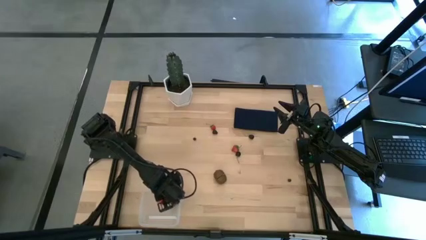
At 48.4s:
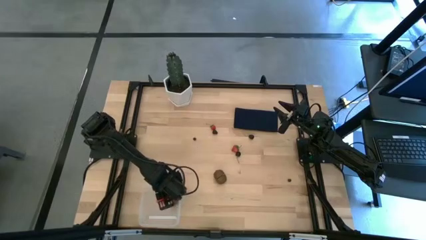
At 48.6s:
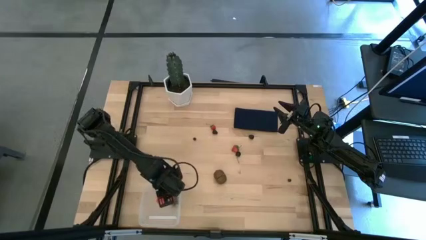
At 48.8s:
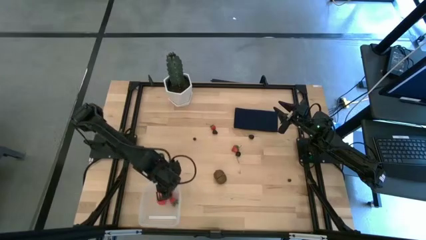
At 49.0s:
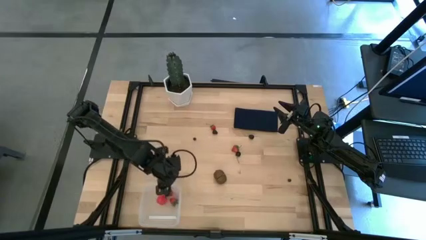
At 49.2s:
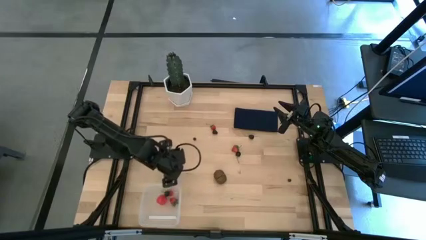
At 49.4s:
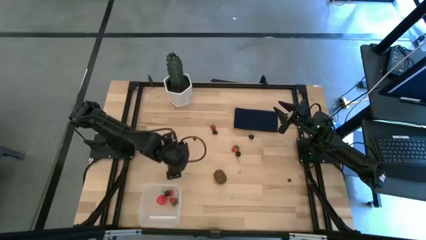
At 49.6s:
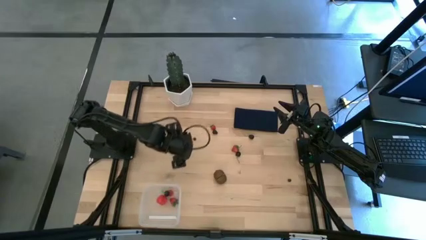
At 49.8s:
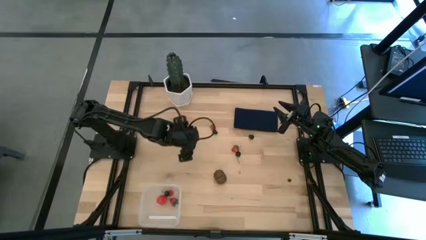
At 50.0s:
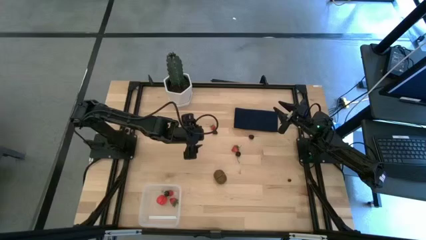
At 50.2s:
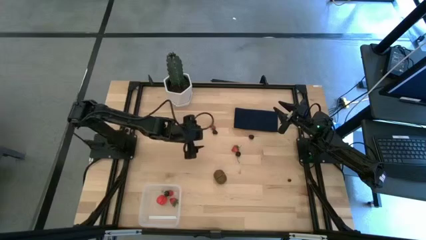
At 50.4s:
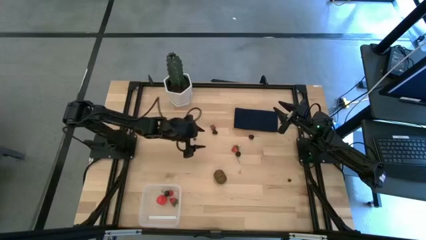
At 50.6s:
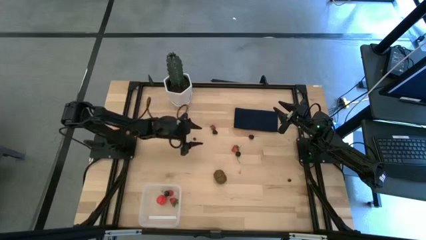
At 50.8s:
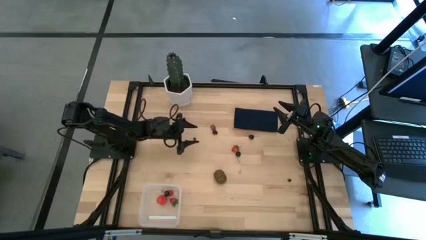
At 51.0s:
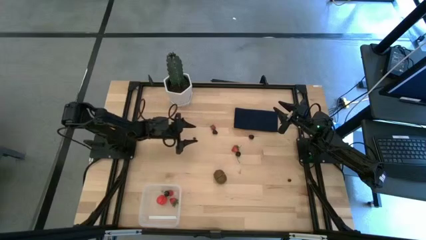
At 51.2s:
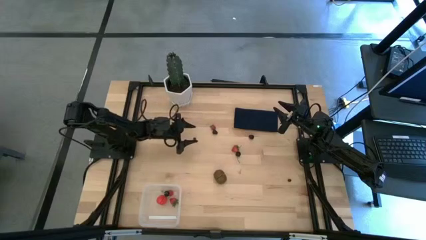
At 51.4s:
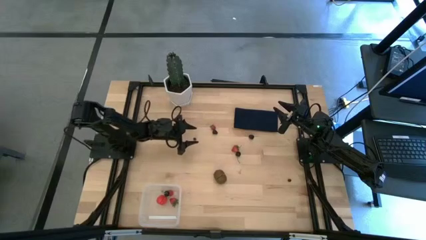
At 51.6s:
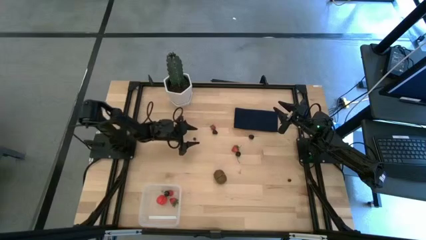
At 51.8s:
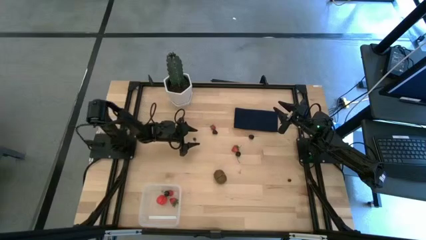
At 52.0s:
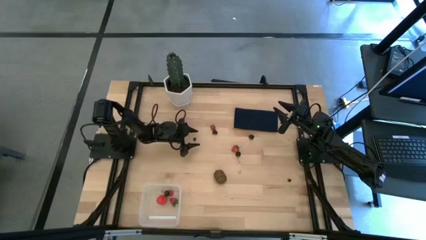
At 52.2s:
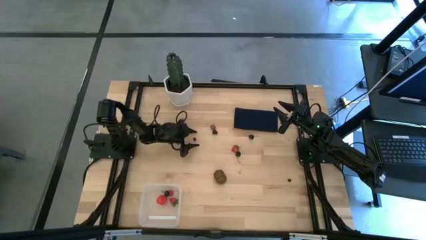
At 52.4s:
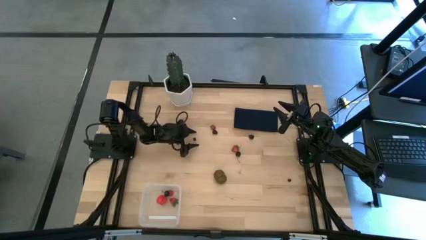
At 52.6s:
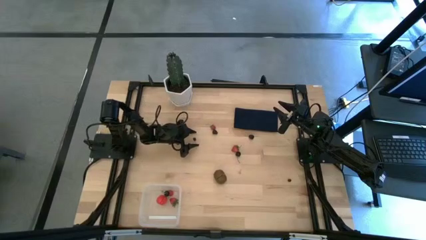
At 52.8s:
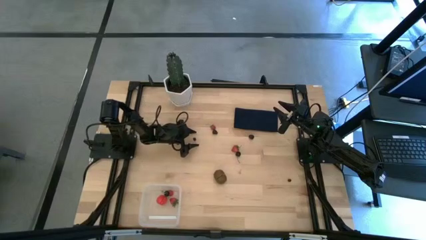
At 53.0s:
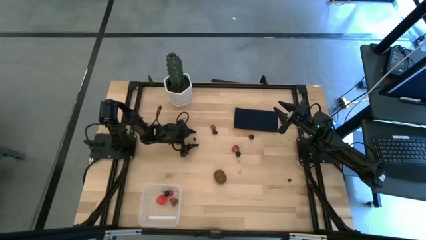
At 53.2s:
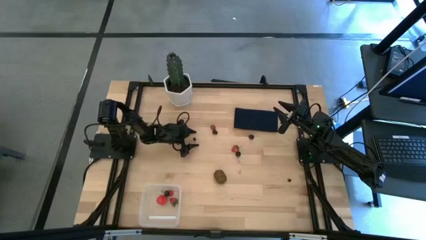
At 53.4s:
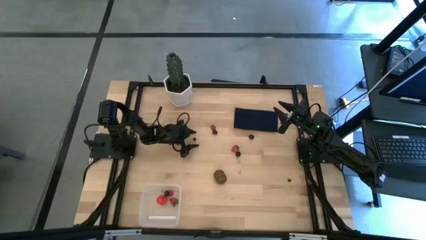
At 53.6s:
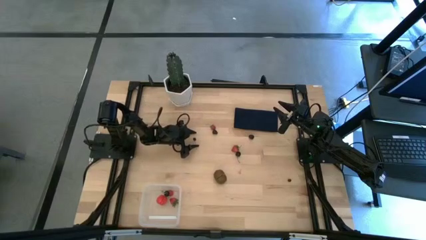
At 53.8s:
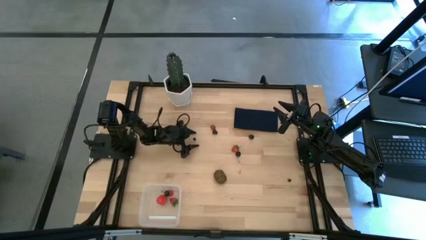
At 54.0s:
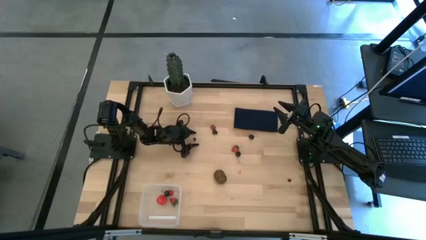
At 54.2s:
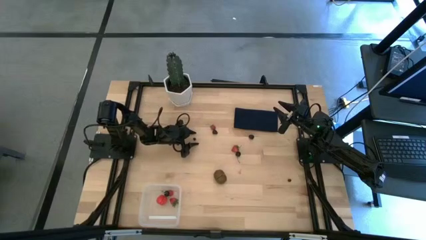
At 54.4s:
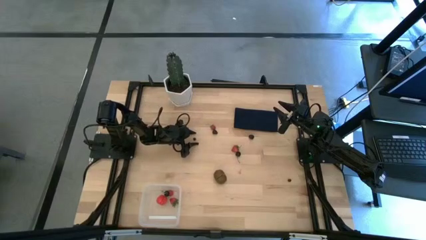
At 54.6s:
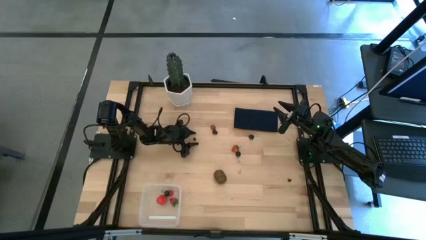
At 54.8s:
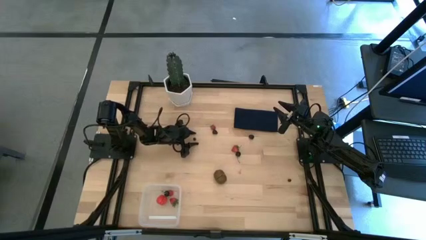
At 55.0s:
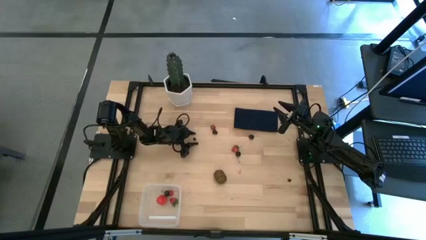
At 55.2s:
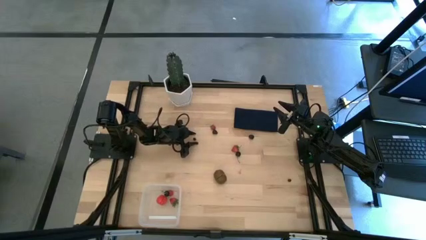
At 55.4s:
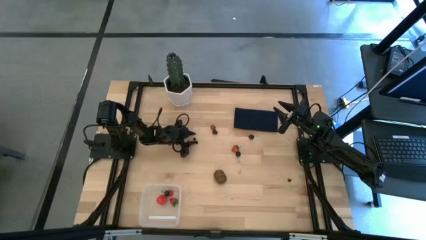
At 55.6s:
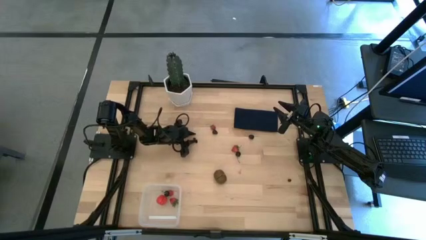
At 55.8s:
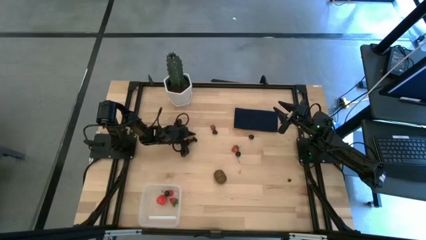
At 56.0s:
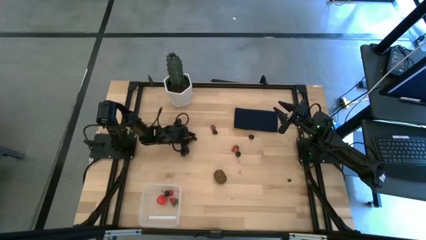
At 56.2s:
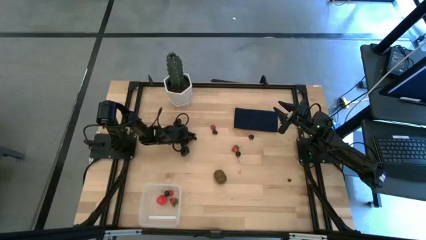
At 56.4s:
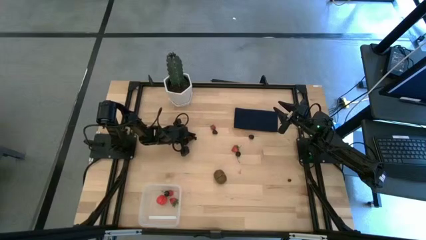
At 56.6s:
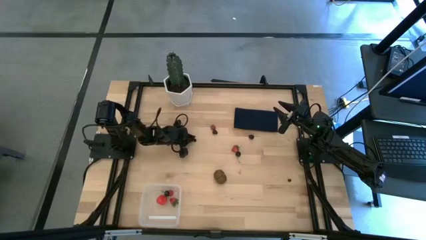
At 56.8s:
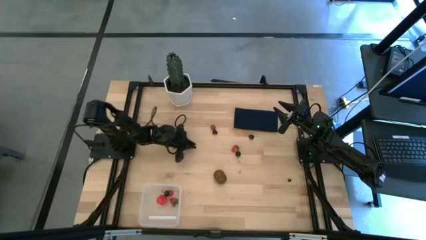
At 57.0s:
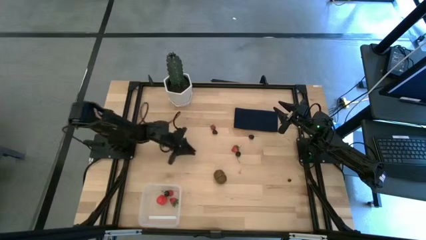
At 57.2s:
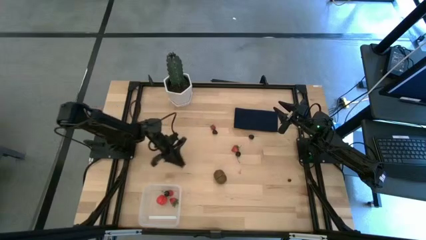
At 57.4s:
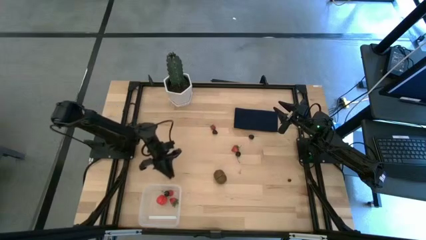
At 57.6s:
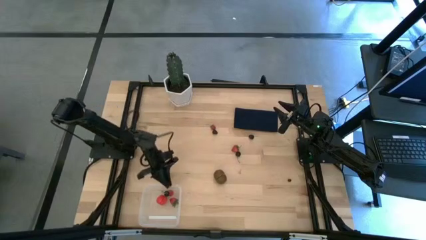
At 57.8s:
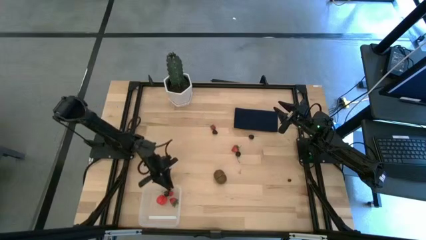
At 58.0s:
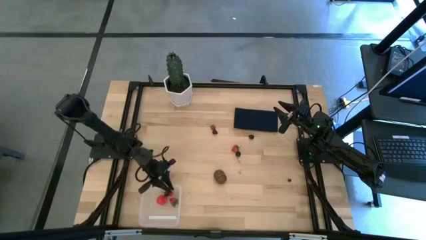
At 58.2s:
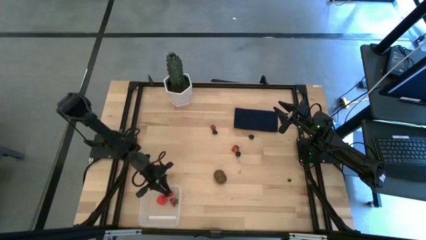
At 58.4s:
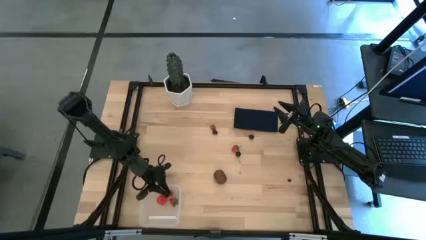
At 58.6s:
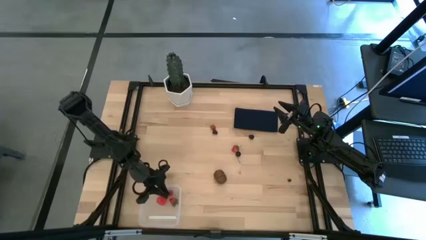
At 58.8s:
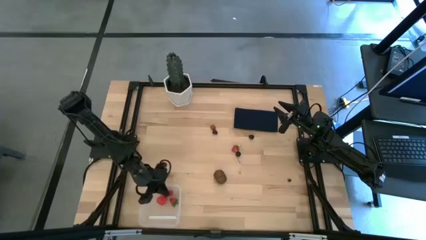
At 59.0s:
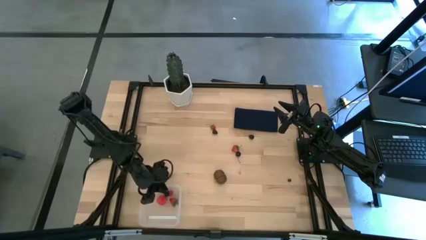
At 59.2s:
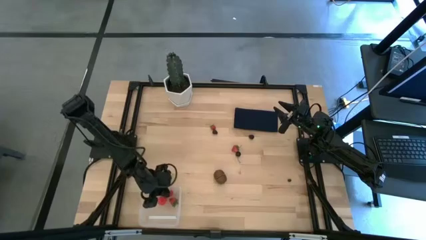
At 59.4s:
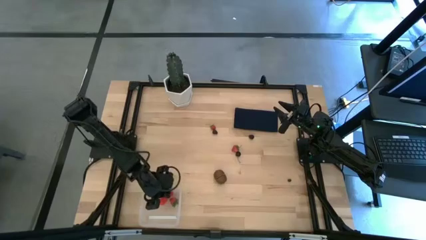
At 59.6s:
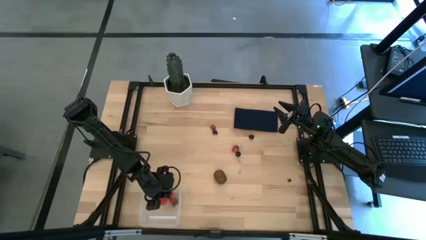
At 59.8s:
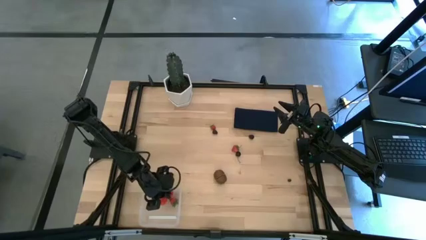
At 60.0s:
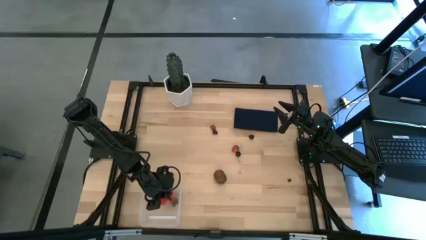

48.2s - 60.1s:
Task: Pick and placing Produce into tupperware
Put the blueberry in the transparent bin

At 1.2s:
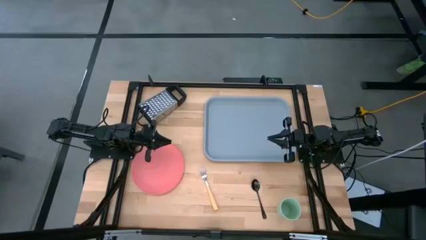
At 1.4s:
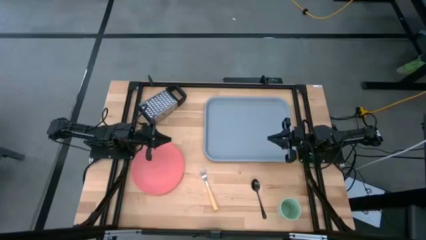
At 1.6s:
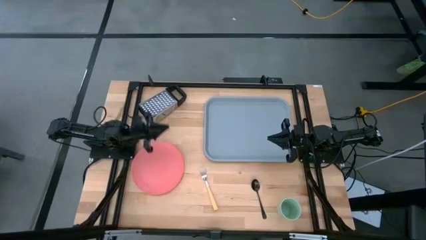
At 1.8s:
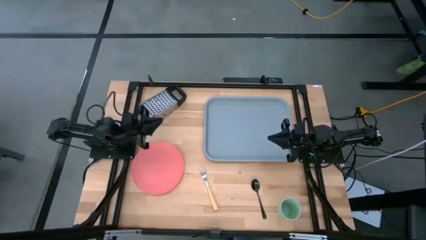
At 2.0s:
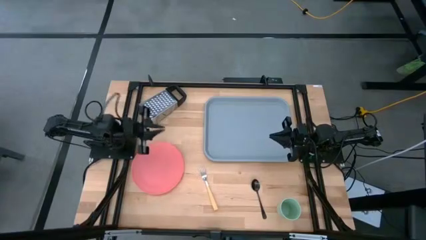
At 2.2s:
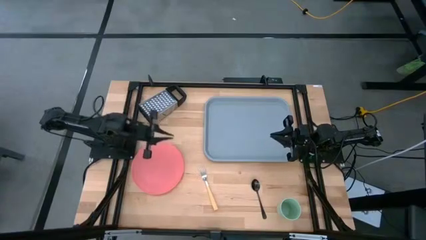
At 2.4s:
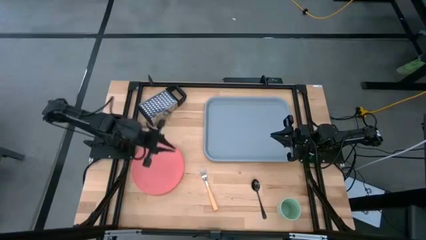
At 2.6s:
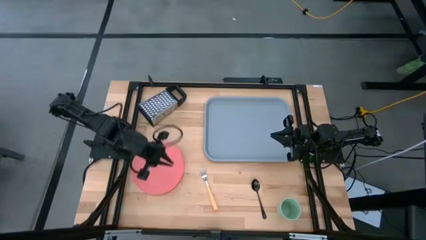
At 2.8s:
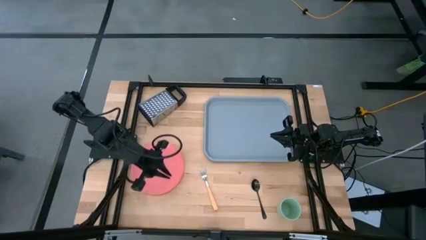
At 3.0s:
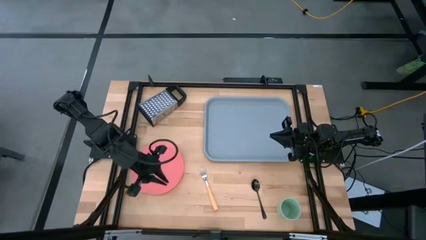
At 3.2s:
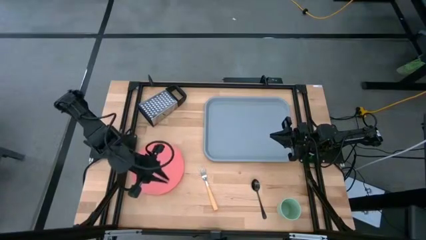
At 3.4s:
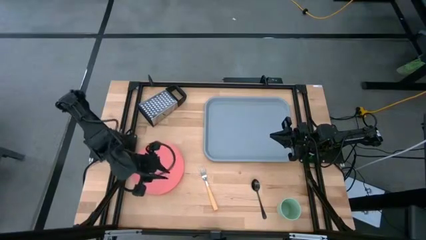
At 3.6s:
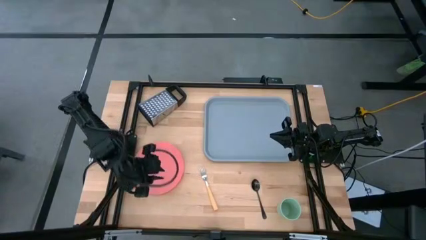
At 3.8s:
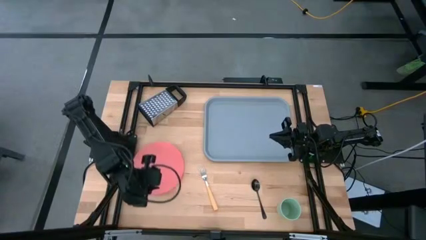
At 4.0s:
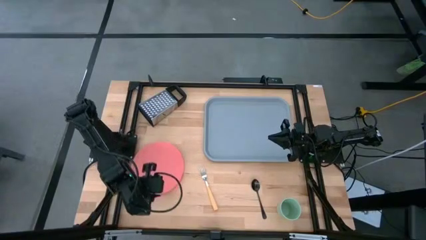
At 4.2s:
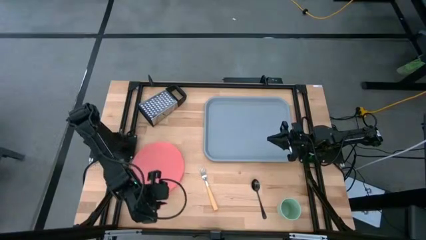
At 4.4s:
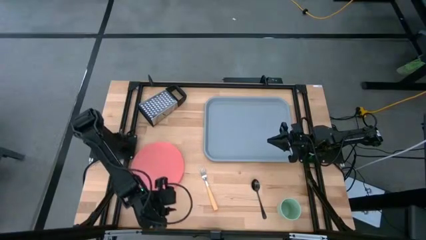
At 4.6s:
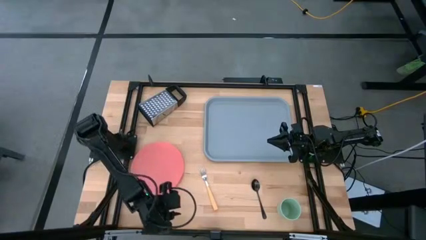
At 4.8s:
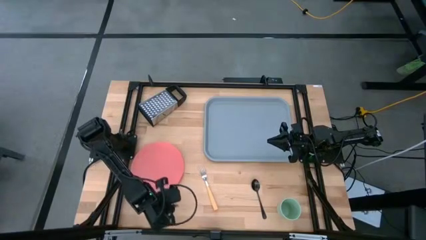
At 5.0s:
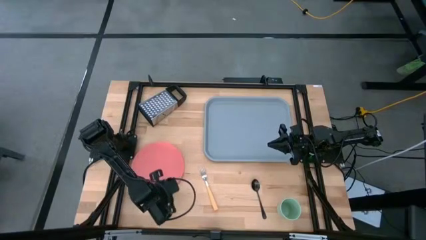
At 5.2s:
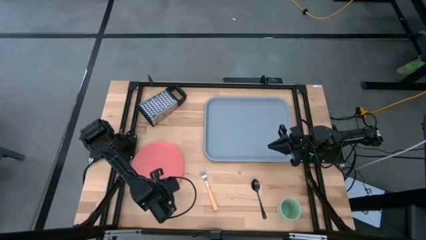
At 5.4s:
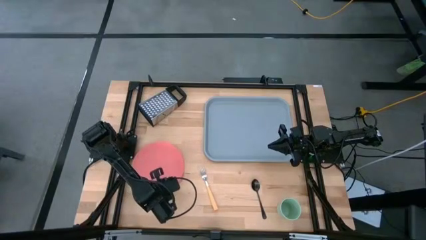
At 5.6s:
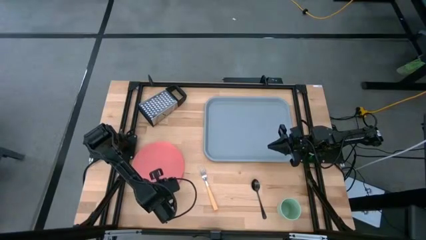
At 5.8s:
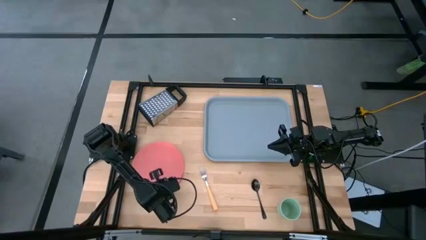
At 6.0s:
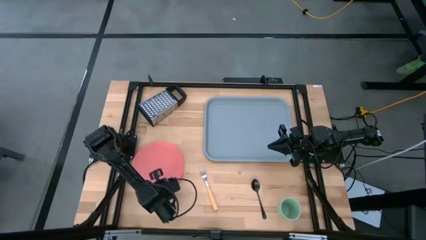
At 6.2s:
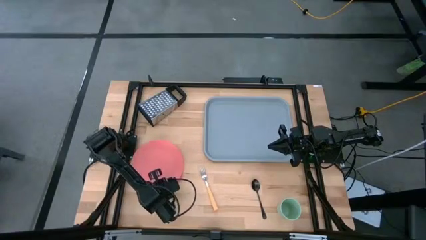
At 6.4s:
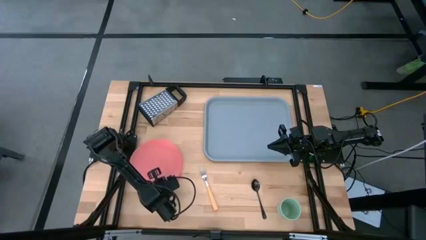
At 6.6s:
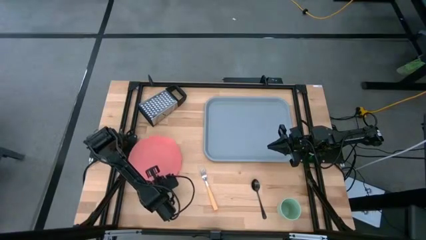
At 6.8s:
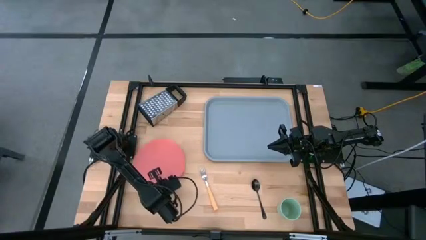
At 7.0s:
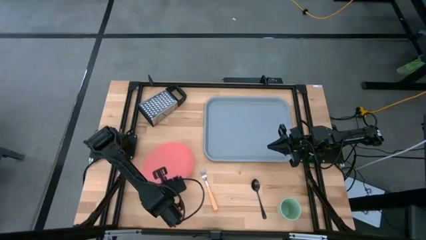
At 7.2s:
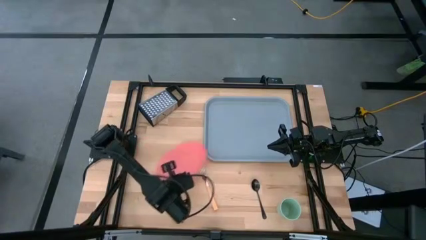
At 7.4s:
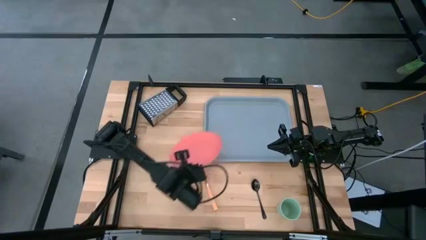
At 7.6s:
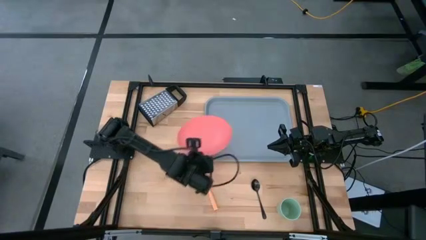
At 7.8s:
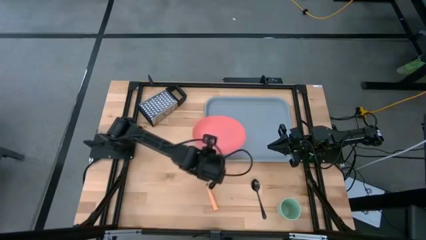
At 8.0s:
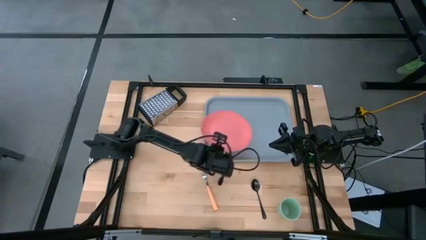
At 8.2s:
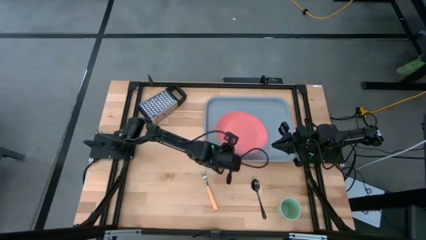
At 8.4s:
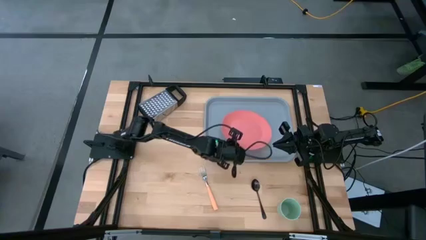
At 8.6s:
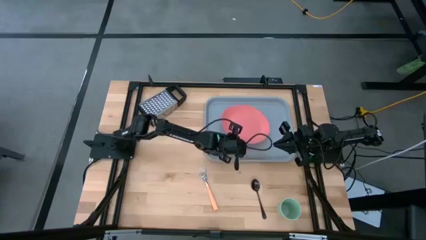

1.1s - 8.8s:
Task: Pick and place plate/cup/fork/spoon on tray
Put the pink plate on the gray serving tray
